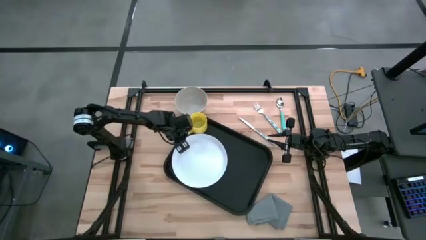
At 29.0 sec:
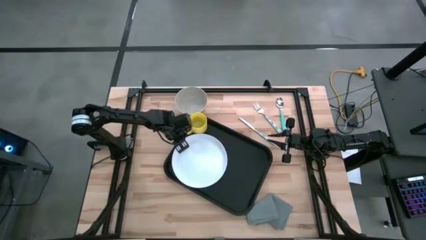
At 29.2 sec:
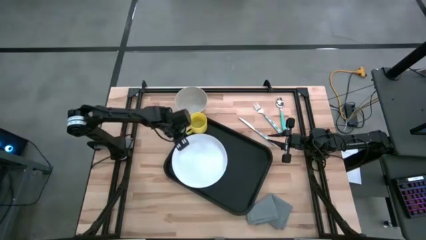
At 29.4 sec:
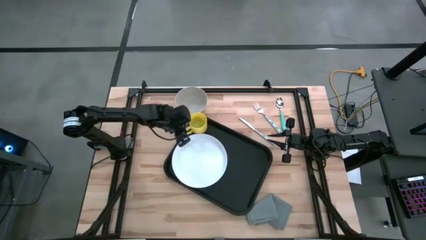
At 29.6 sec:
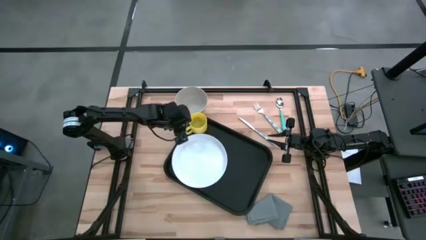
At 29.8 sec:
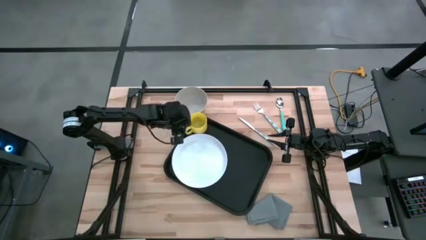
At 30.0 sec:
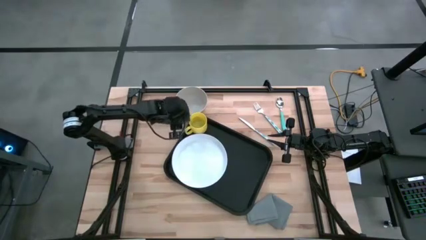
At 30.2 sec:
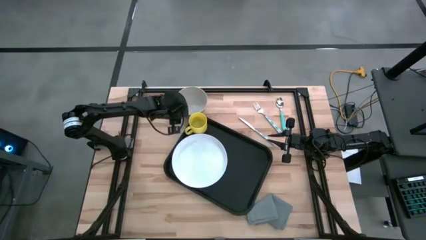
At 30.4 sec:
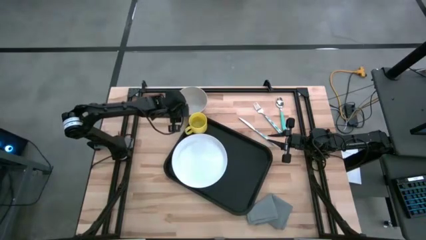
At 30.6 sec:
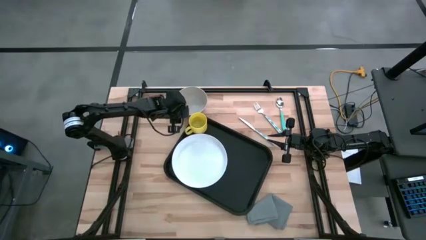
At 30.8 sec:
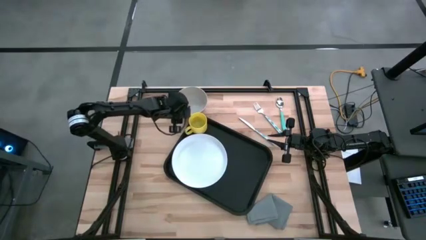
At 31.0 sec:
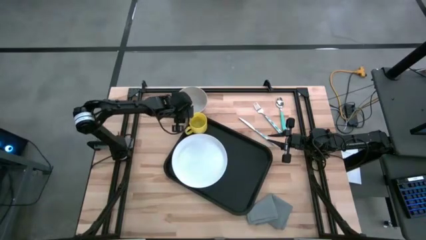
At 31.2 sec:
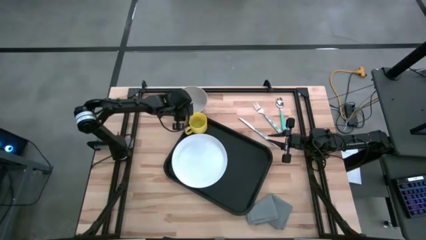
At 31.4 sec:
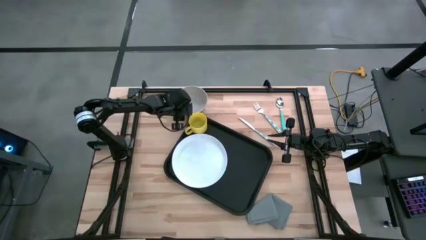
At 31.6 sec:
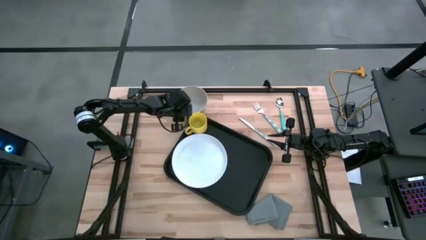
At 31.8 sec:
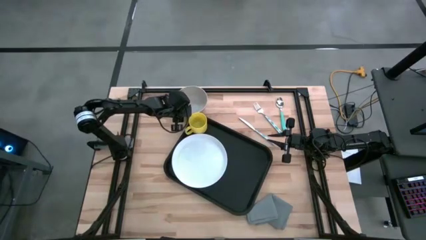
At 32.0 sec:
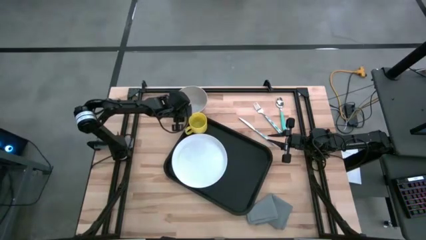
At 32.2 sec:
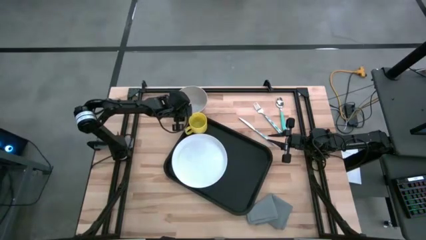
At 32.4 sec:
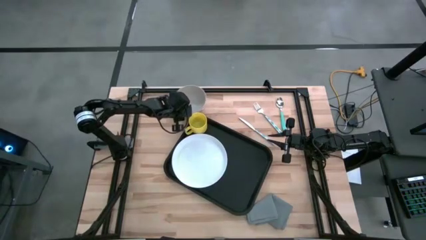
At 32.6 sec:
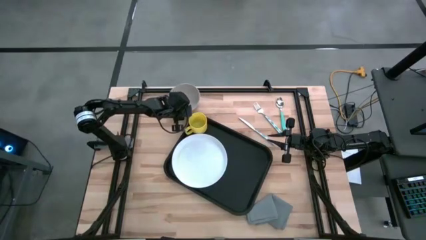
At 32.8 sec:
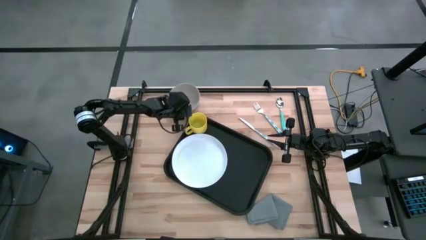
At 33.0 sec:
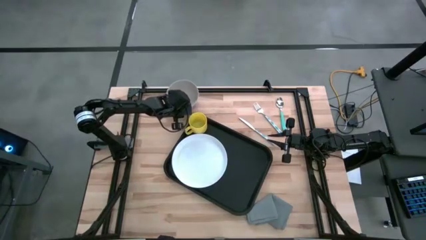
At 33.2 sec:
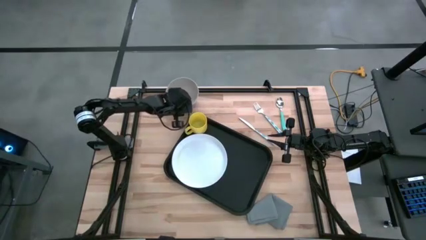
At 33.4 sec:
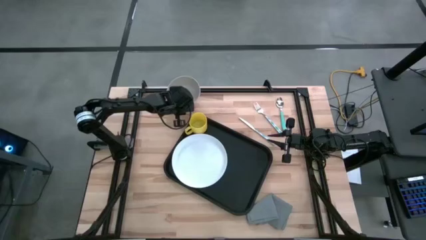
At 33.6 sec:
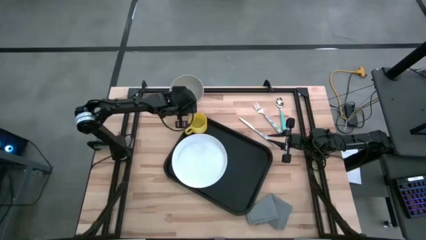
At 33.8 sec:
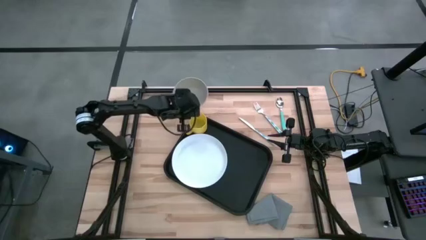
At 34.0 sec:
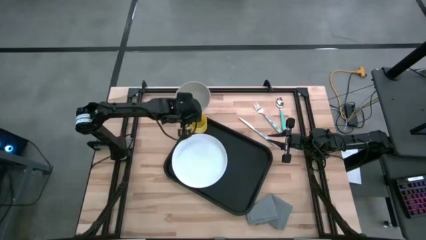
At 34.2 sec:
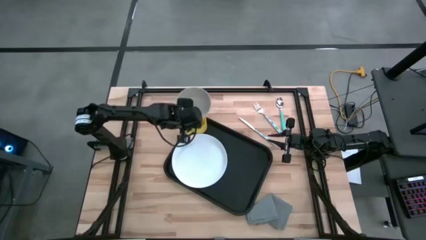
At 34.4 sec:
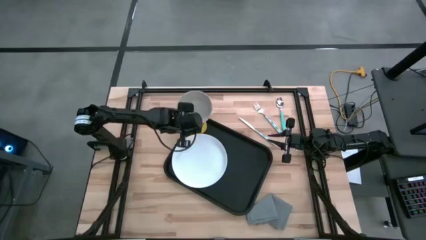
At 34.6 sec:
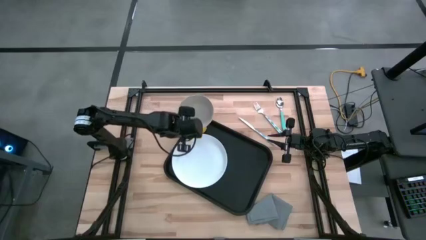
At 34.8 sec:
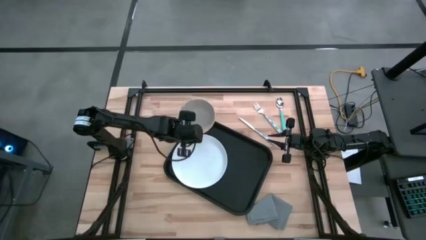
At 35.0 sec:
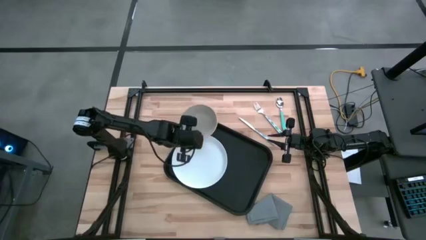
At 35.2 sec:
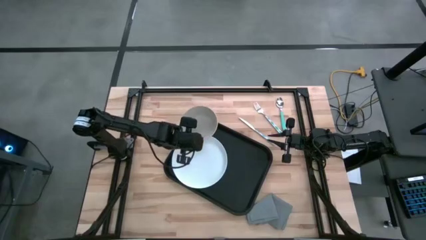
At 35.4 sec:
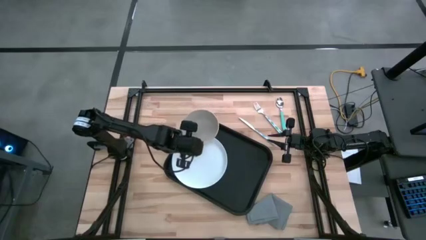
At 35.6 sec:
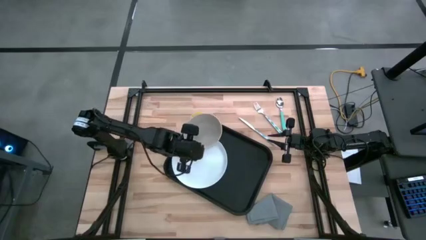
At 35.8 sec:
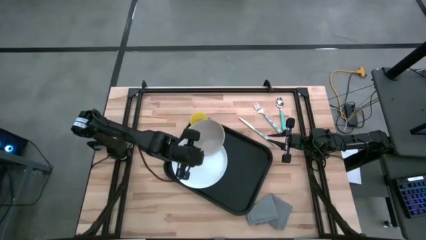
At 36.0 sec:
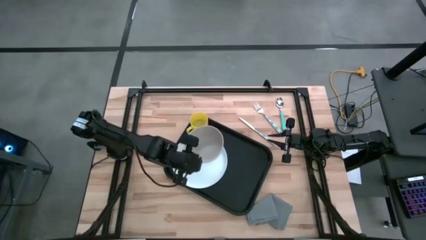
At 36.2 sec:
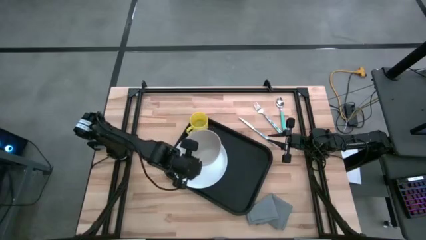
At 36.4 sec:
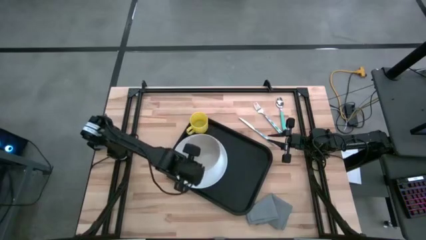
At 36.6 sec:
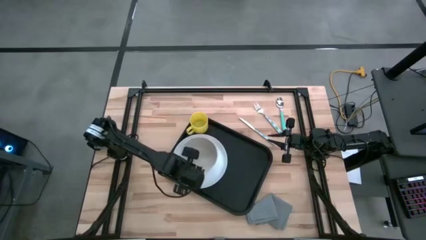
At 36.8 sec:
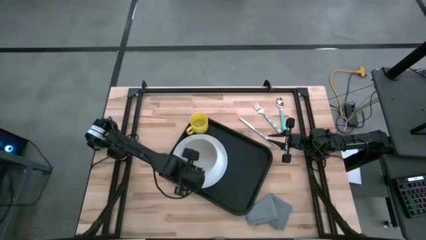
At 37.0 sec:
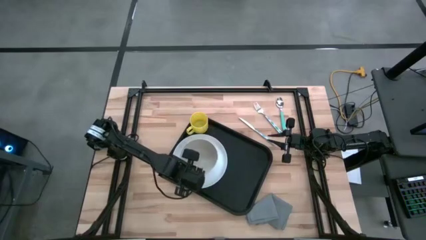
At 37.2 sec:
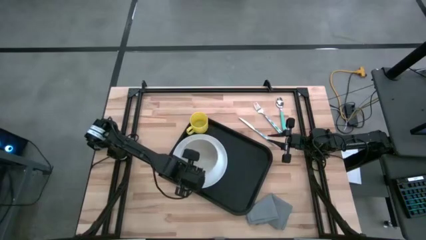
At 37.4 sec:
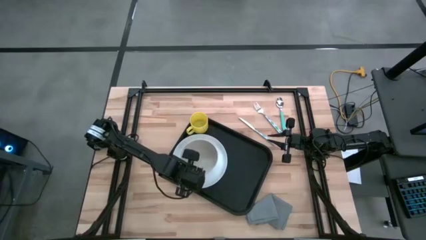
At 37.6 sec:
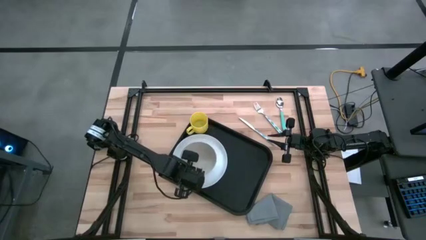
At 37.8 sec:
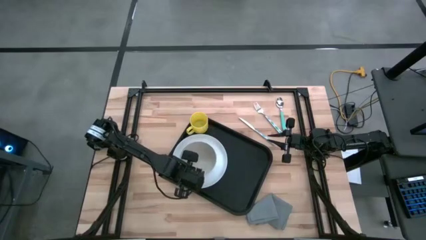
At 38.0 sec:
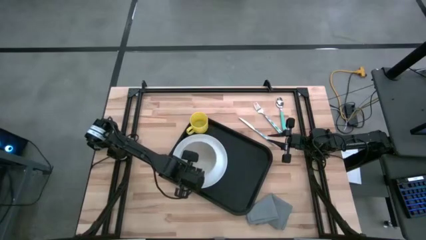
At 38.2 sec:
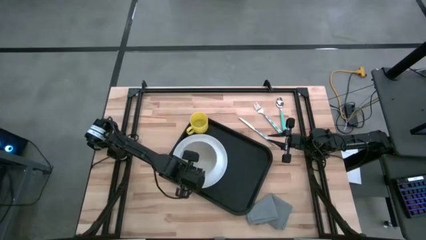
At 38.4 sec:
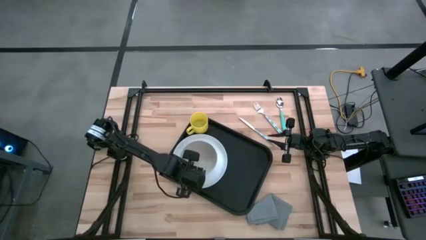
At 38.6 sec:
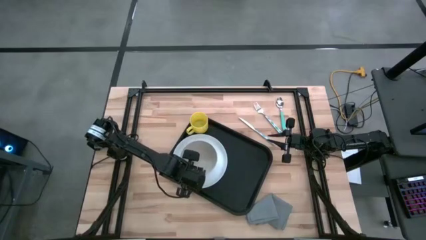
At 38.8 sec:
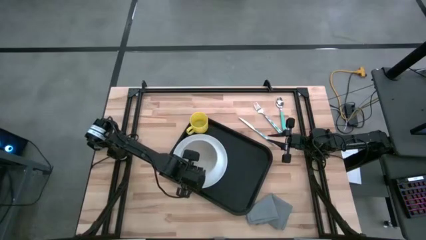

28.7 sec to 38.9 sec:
Task: Set up tray
Put the gray bowl on the white plate

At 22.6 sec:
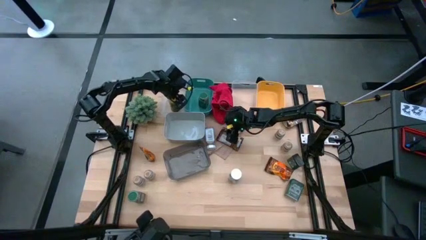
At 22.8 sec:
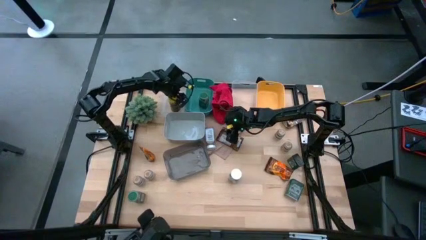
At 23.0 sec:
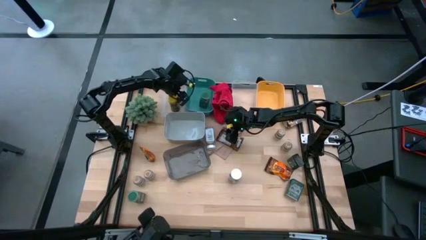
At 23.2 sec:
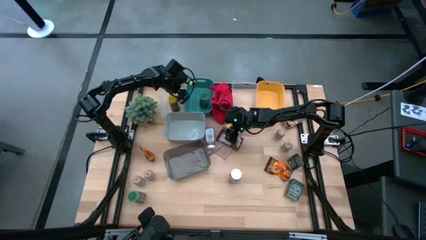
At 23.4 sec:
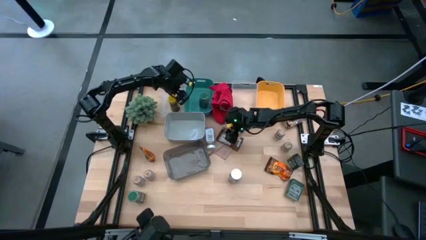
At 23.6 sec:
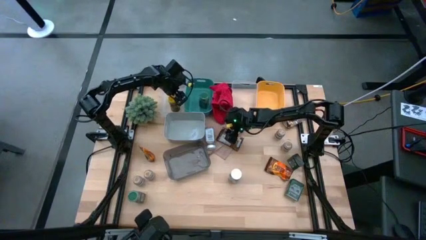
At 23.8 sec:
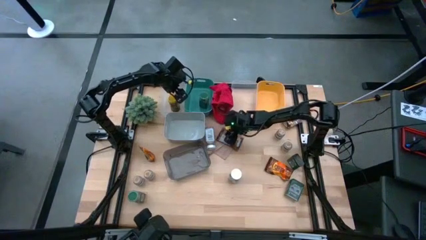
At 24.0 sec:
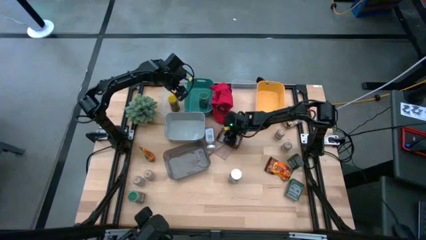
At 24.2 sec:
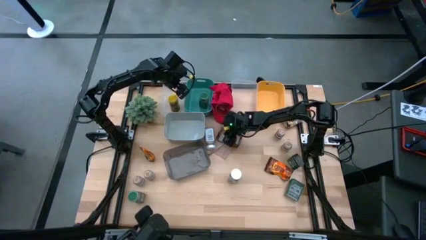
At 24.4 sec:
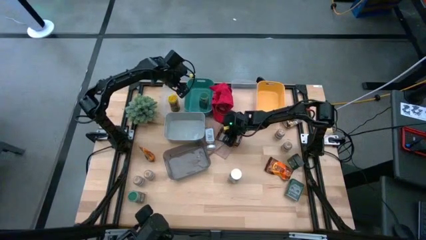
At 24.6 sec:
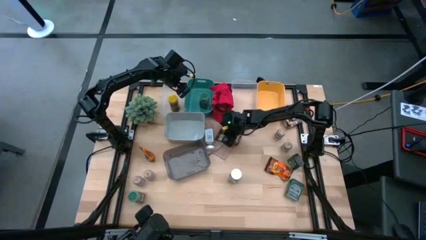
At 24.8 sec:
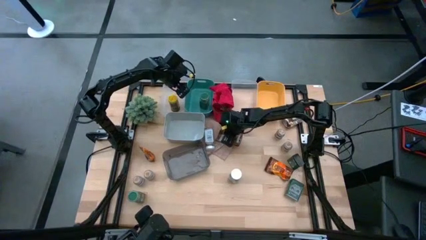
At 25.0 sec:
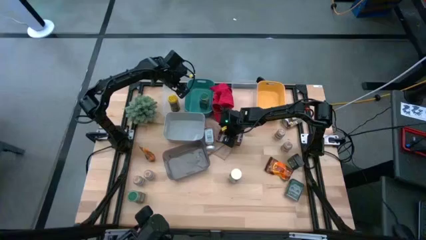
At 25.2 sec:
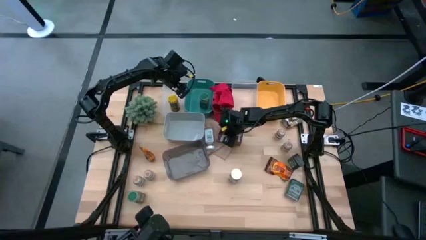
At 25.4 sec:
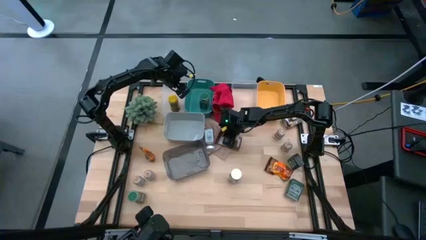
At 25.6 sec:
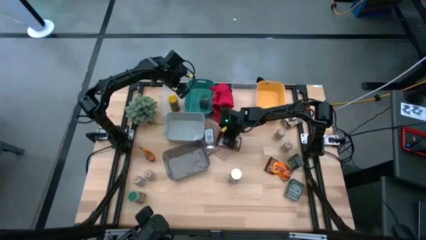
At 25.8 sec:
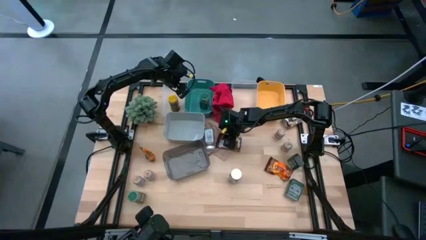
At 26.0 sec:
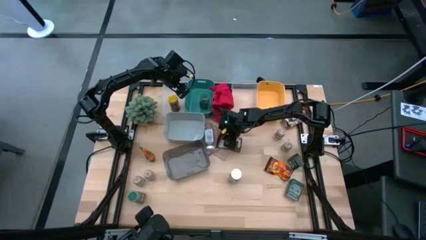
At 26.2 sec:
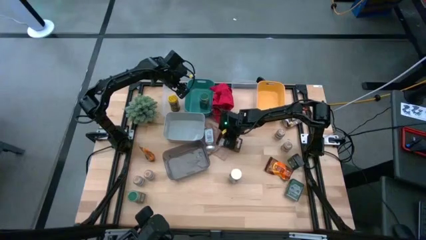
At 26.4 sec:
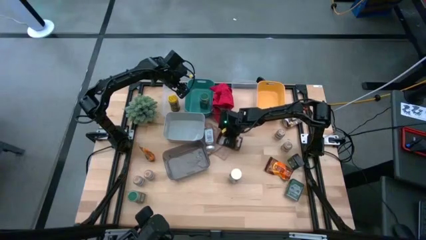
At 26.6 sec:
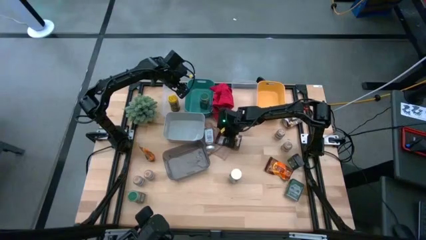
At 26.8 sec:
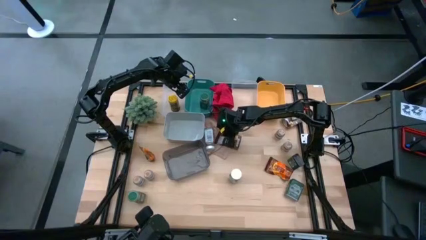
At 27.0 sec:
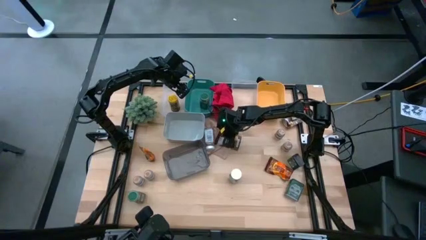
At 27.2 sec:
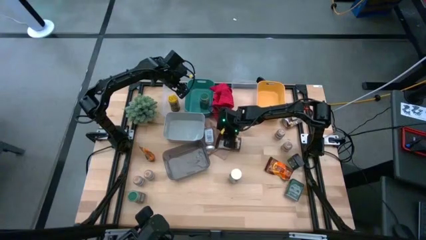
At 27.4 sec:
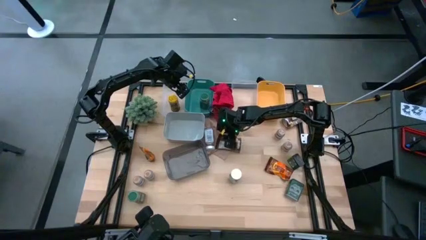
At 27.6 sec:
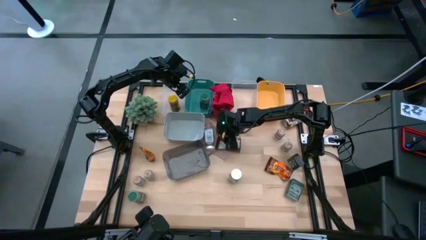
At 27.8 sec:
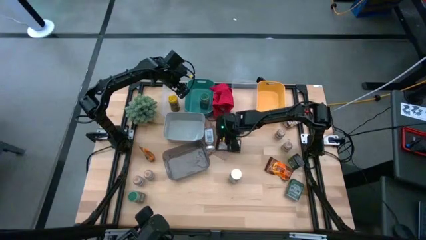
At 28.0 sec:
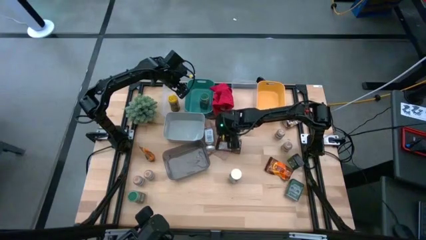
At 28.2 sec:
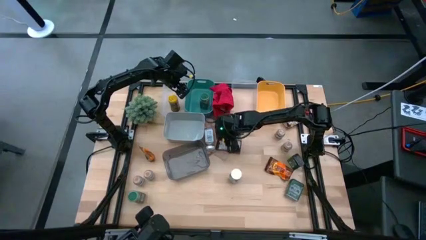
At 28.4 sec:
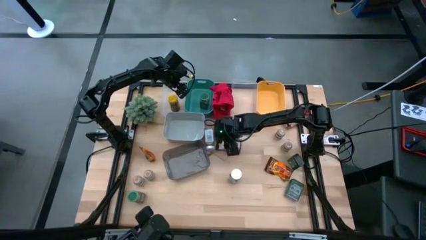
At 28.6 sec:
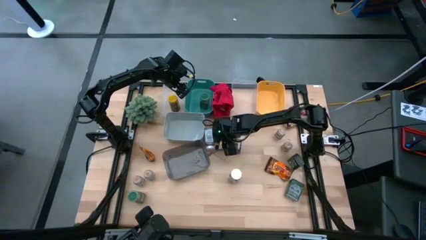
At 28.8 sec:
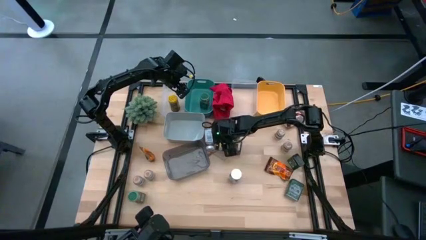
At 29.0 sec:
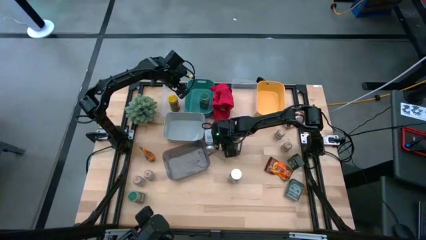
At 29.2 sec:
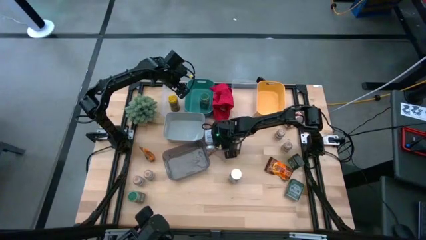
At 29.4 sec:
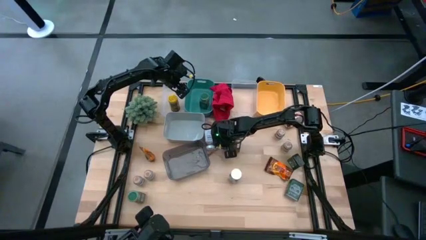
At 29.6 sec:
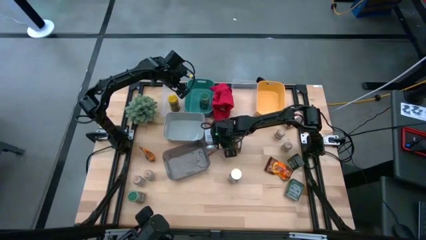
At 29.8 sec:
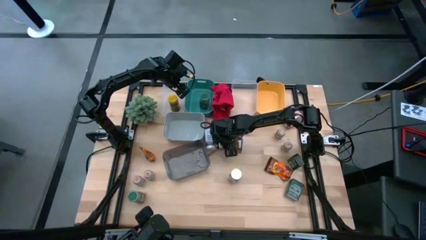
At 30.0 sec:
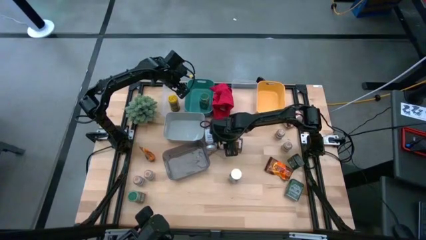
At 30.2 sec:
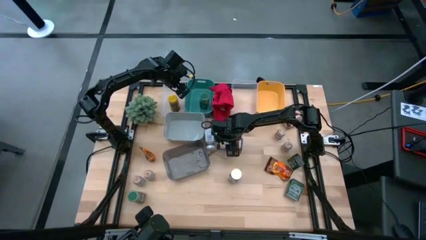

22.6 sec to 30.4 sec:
Task: Sort spices by type
Put the orange seasoning pack into the right transparent bin
